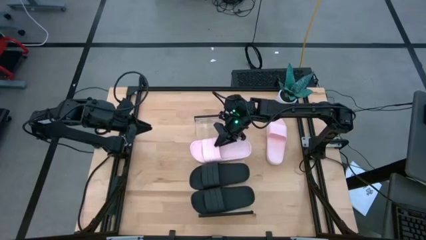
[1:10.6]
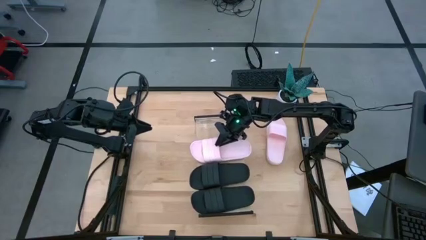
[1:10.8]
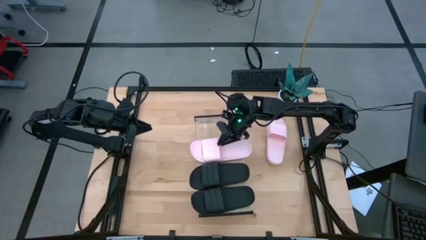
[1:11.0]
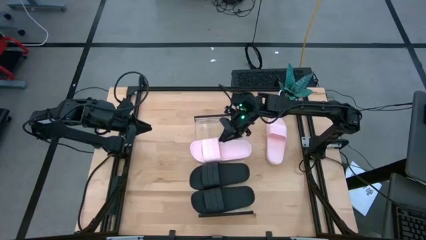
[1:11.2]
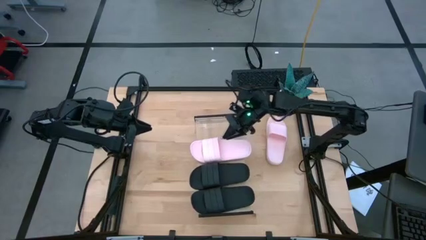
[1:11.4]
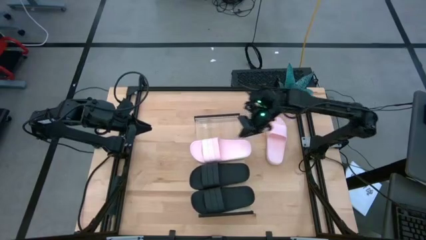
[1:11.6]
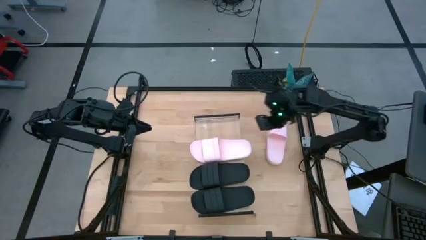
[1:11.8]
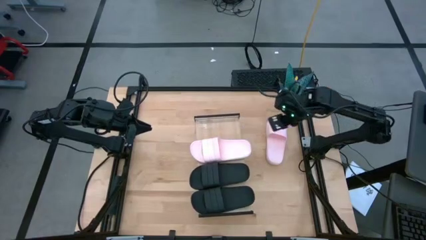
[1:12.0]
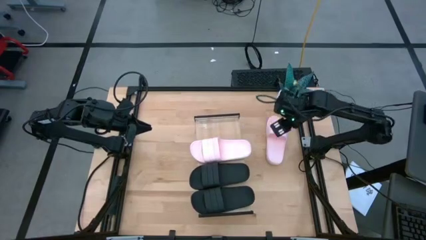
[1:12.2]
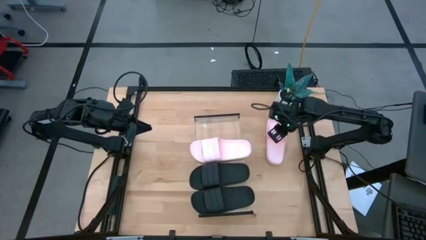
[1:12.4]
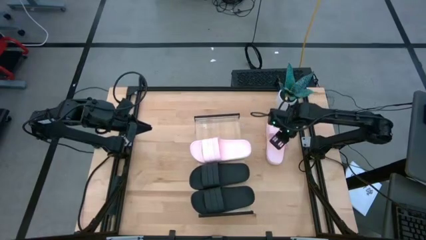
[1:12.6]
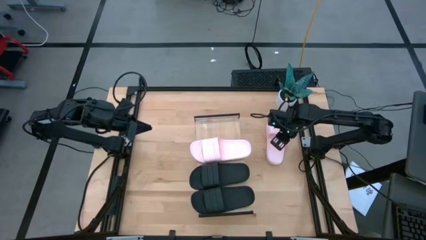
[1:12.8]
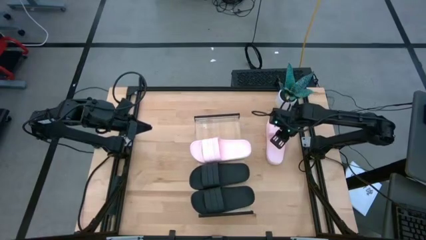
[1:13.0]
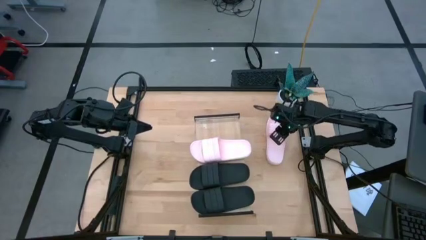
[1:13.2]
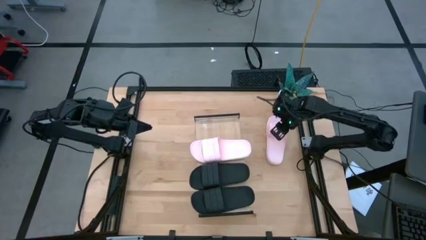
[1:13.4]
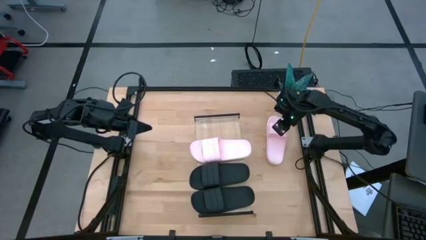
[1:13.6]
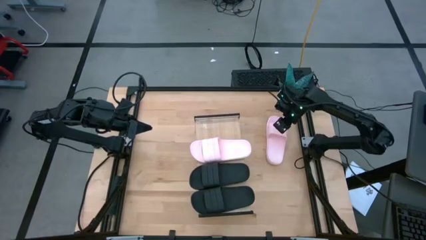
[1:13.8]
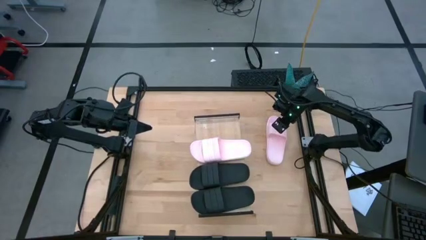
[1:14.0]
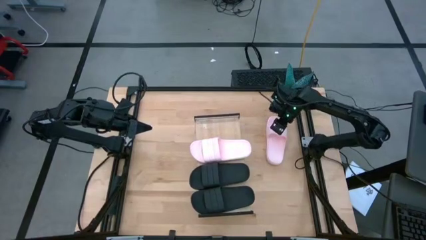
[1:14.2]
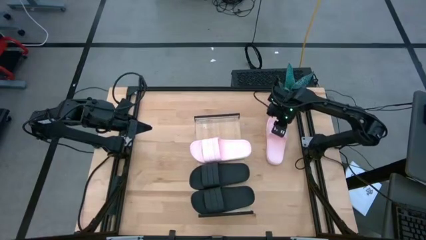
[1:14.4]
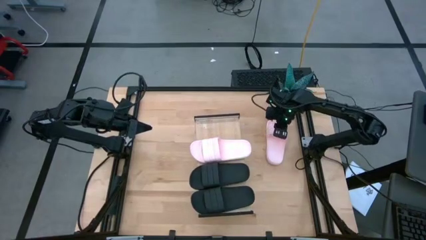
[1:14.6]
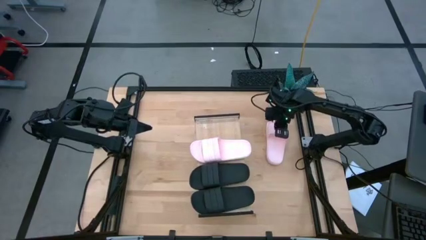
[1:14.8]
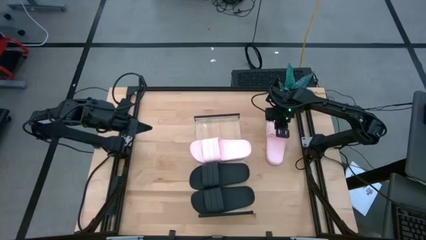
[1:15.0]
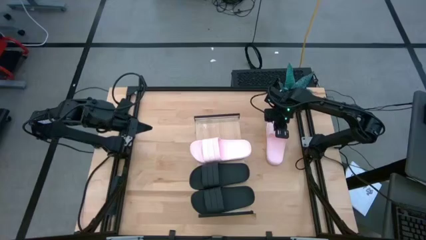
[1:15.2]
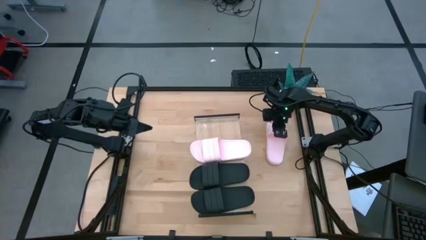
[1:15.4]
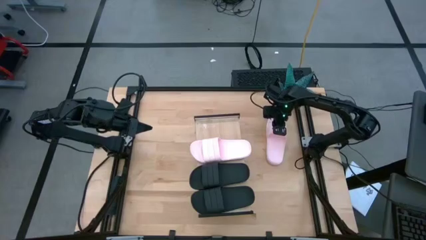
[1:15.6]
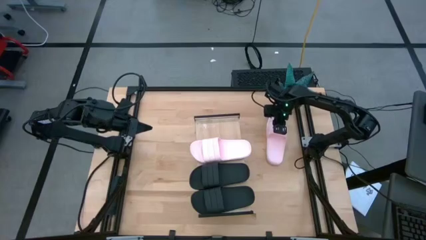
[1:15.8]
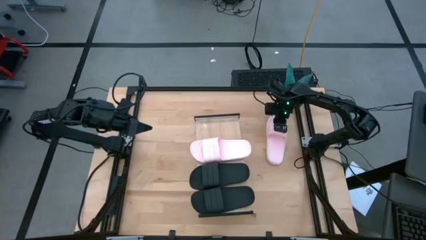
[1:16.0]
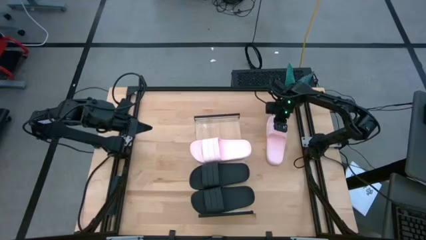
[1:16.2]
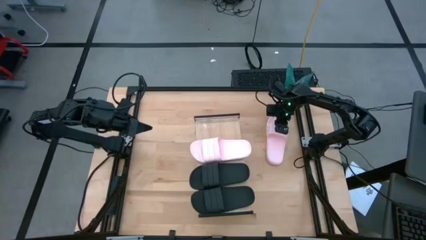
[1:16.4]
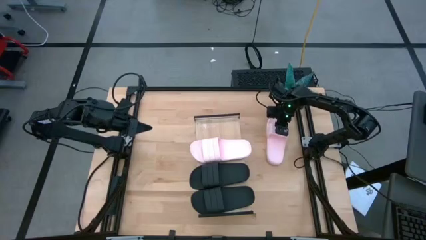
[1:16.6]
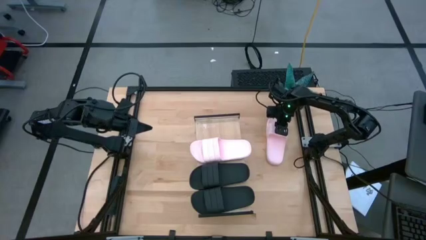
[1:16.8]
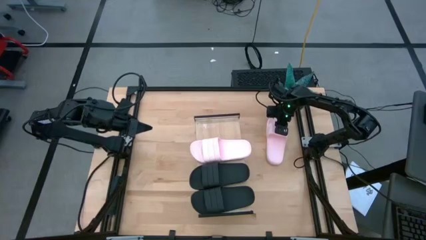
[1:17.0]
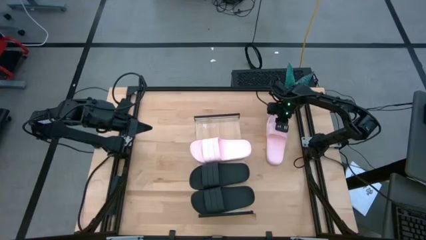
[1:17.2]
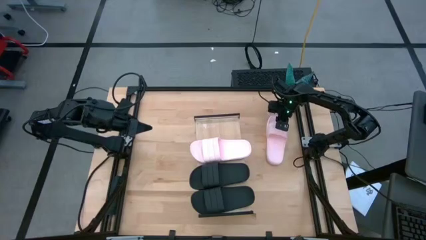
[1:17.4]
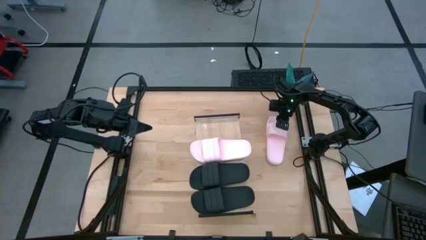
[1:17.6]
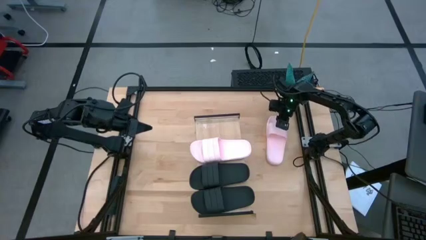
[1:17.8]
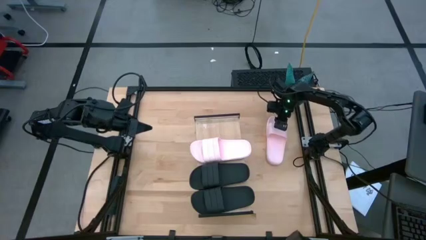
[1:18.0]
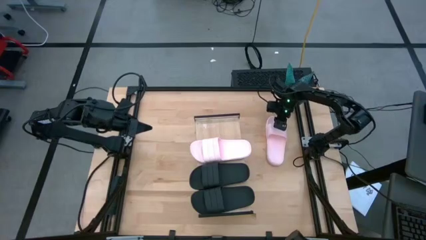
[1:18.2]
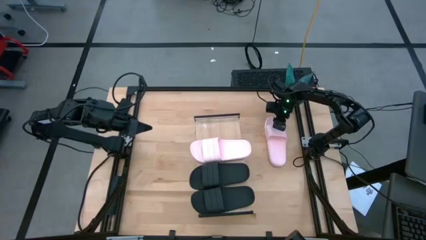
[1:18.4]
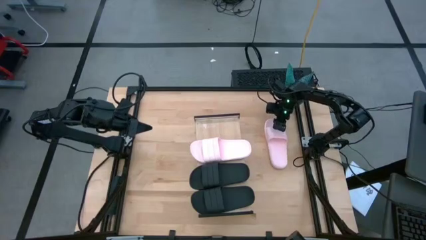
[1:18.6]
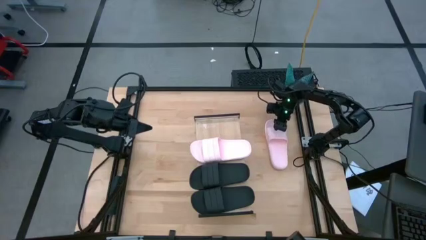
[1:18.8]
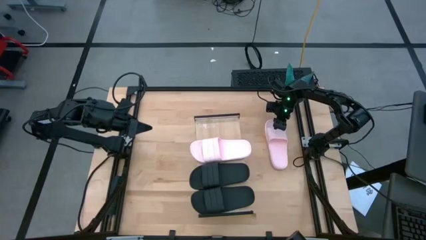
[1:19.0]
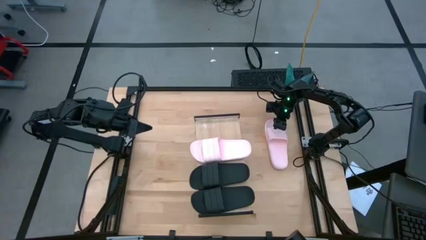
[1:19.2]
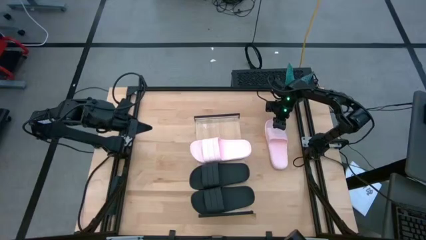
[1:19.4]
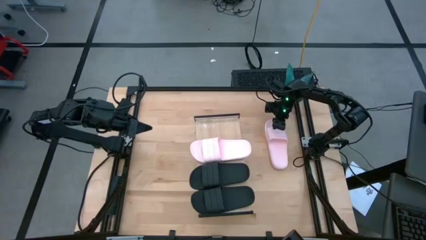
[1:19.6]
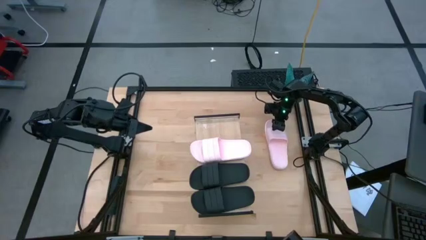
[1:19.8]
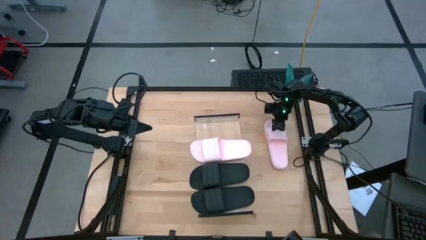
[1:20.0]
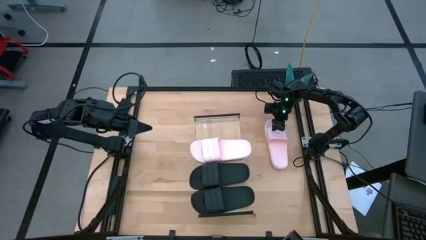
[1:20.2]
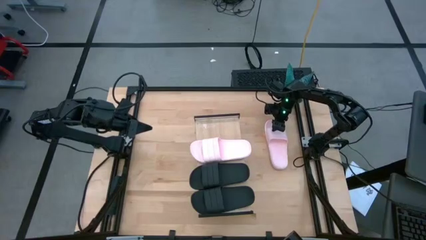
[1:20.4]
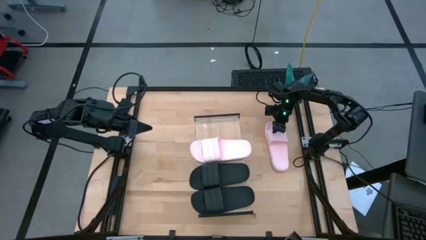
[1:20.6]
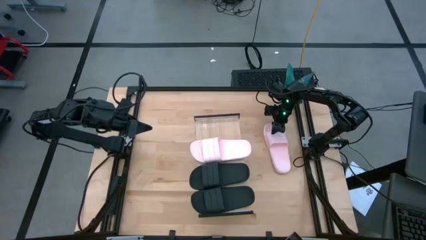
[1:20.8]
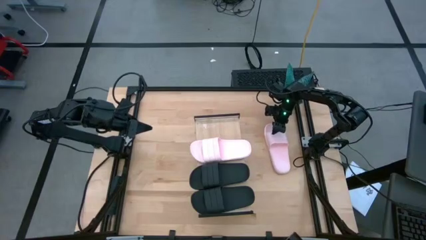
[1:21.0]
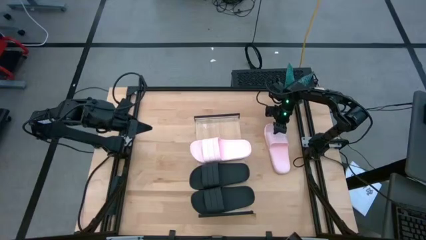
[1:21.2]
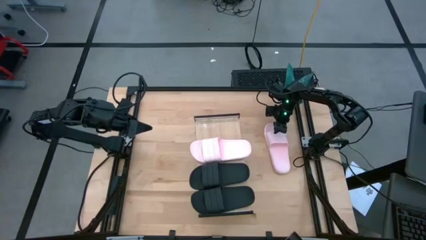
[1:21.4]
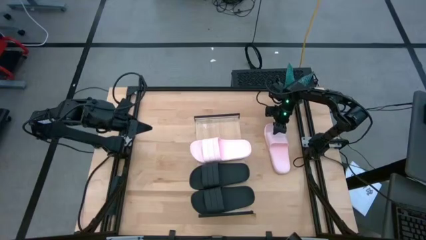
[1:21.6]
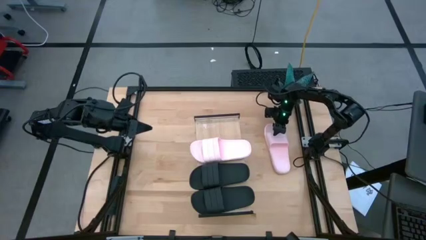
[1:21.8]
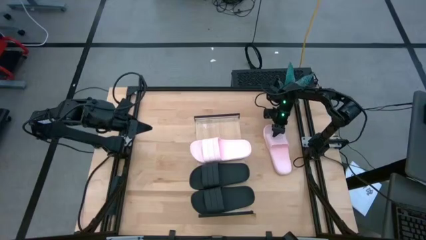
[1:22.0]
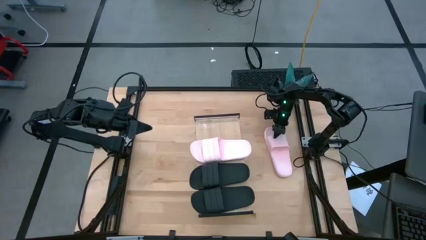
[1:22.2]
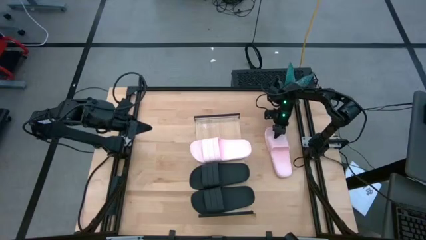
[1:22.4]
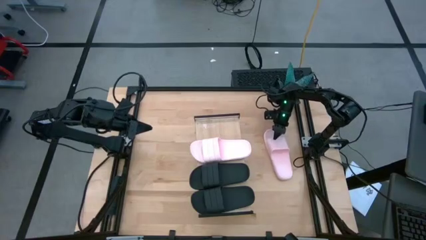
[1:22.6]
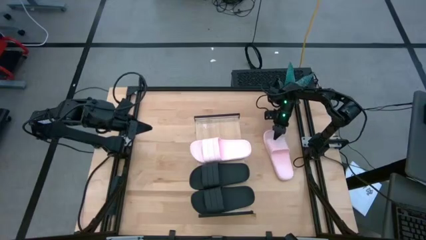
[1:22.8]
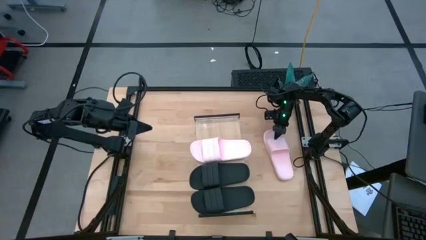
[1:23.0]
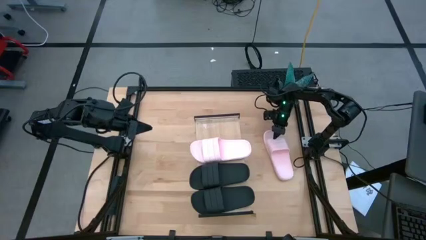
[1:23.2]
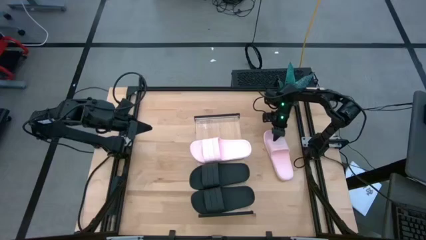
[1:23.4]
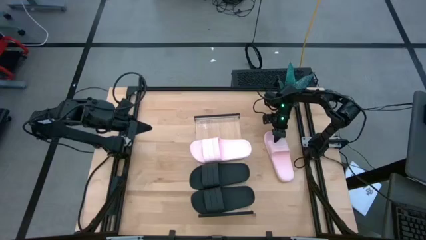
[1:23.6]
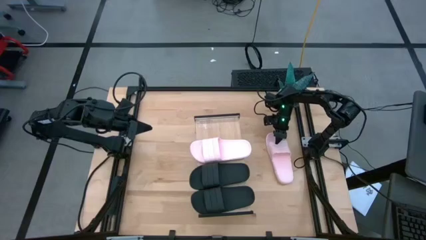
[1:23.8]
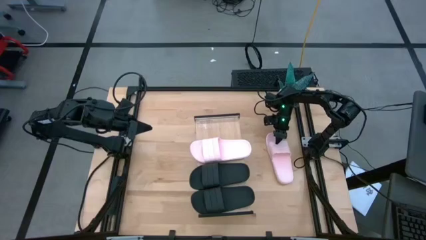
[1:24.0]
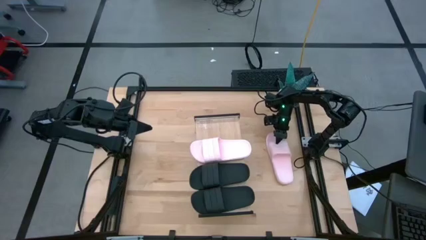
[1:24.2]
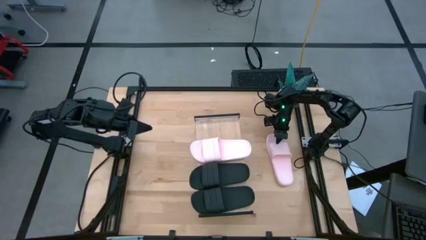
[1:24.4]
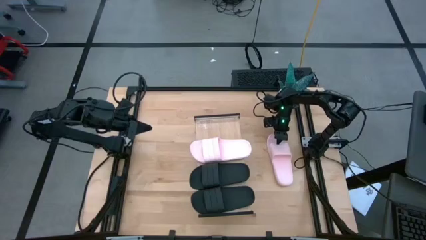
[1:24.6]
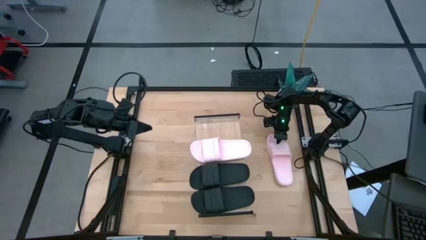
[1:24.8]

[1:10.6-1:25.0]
Task: Pick and place slides into the shelf
Put the pink slides on the shelf

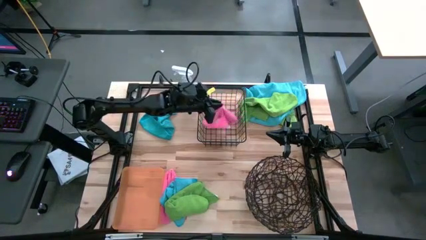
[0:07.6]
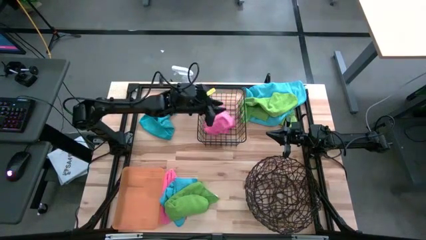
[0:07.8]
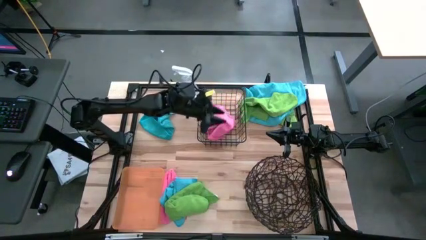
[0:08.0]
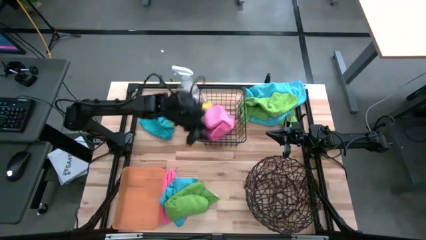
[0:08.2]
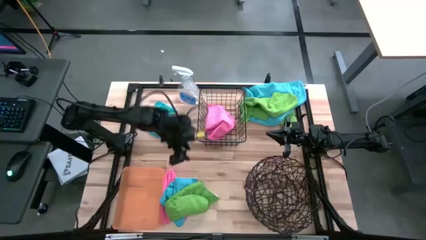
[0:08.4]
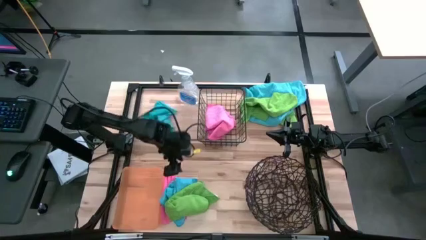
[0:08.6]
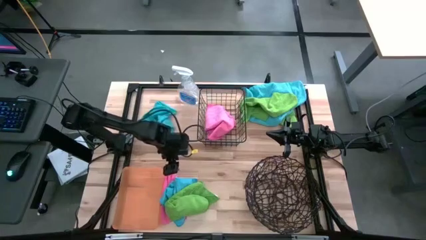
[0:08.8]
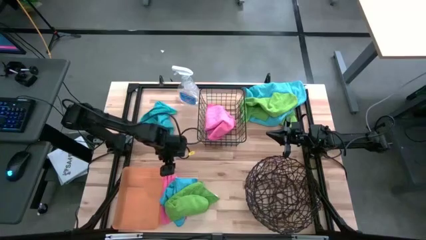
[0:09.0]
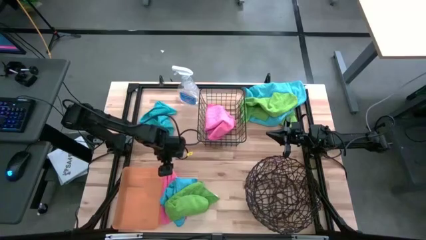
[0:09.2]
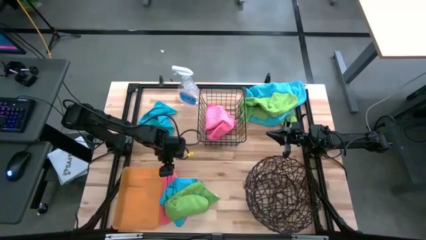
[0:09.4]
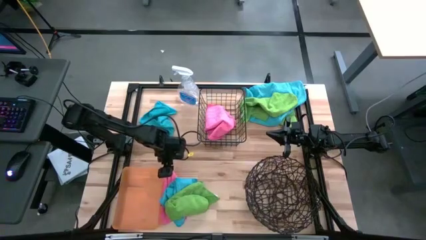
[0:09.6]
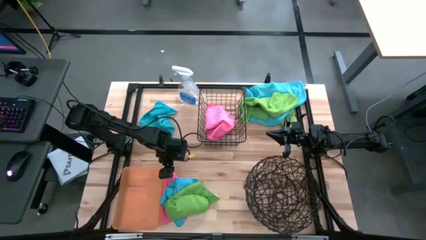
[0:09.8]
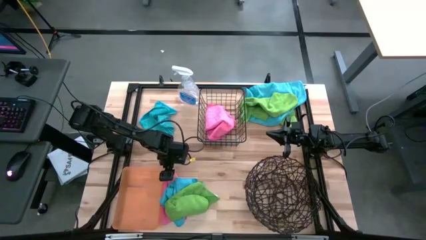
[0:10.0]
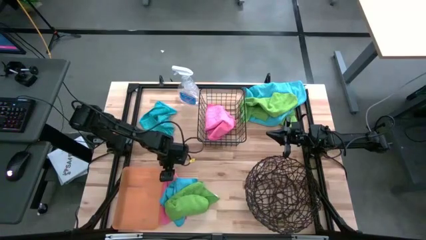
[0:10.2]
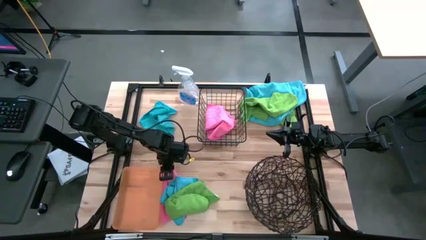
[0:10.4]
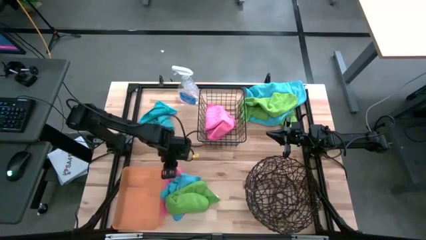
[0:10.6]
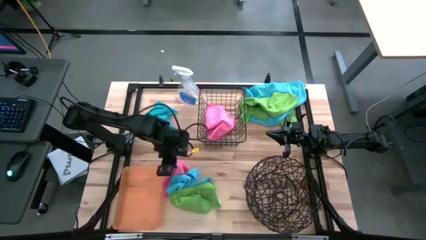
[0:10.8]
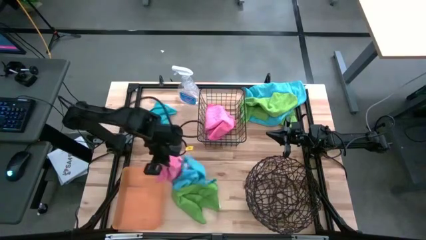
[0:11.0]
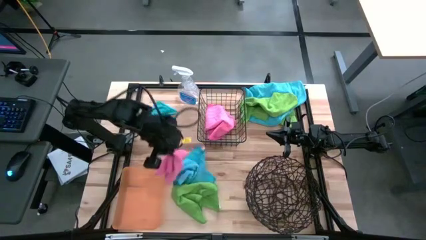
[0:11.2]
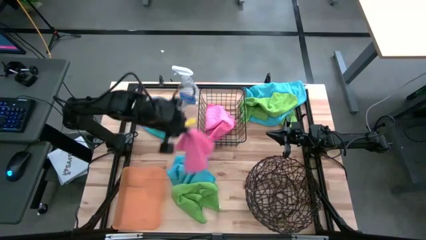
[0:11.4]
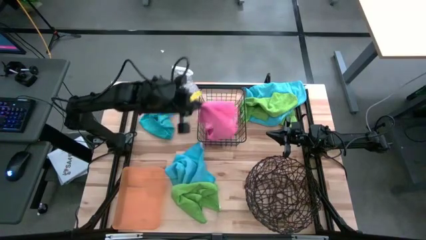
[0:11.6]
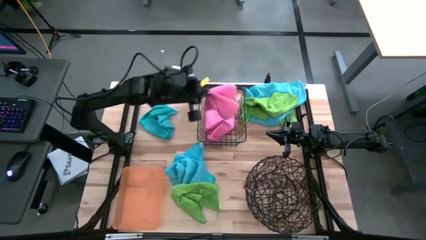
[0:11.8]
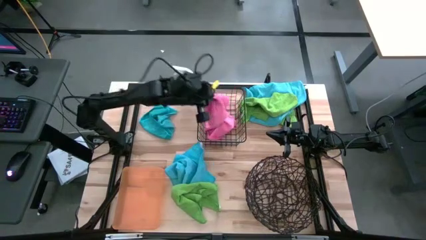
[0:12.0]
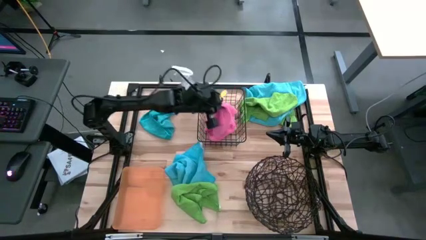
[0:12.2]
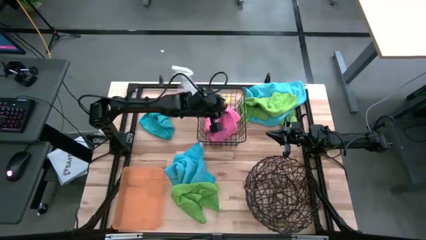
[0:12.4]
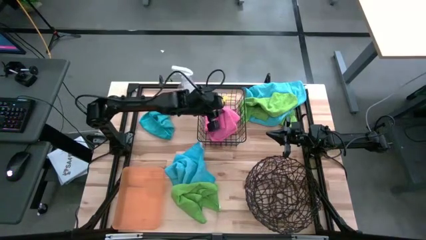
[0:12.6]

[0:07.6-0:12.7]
Task: Sort microfiber towel by color & place in baskets
Put the pink towel into the black wire basket
